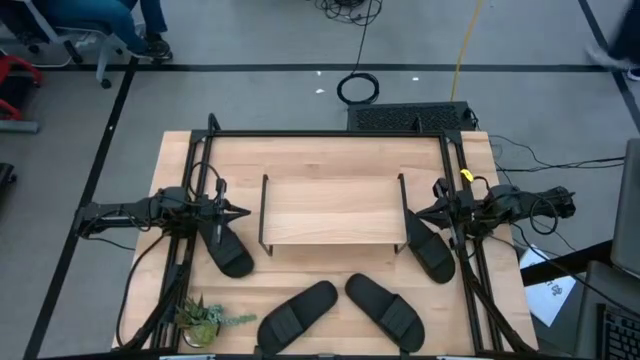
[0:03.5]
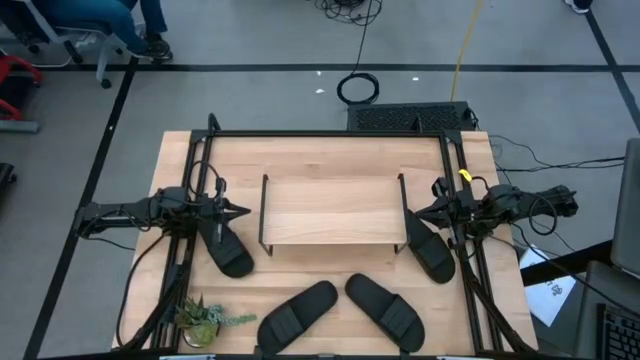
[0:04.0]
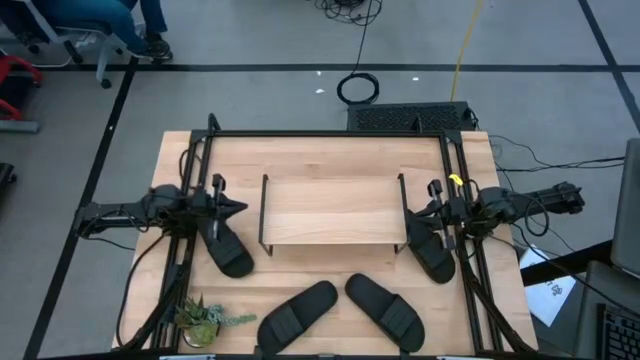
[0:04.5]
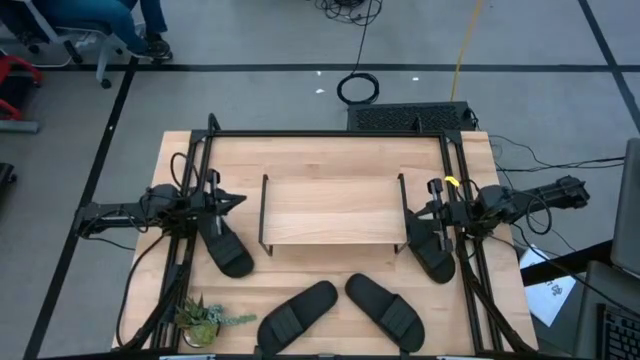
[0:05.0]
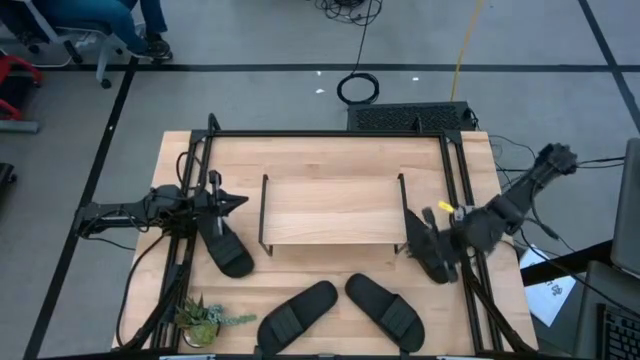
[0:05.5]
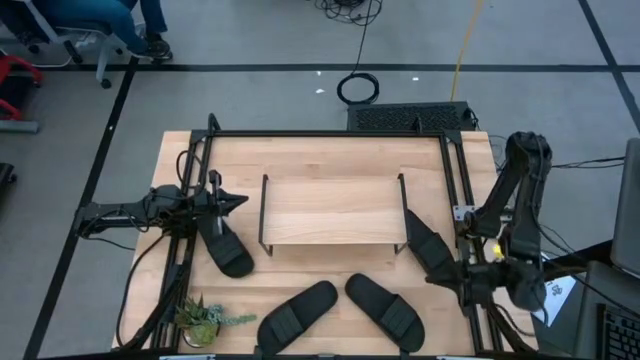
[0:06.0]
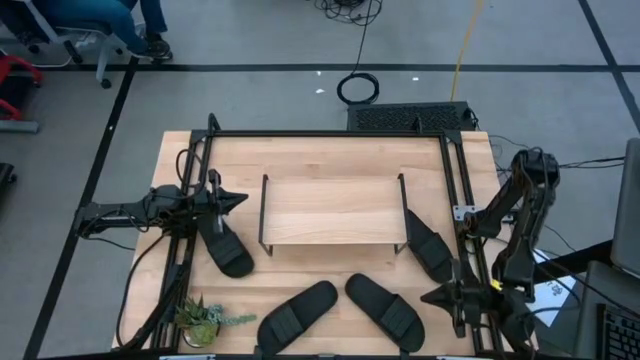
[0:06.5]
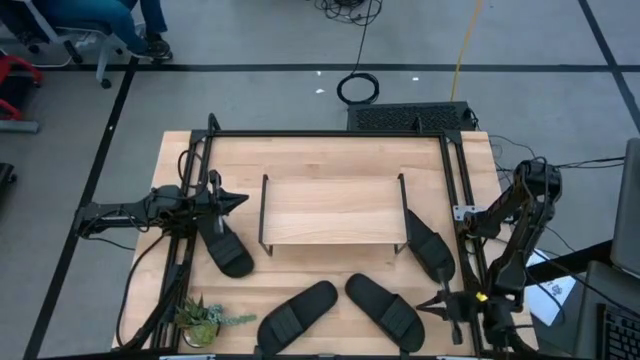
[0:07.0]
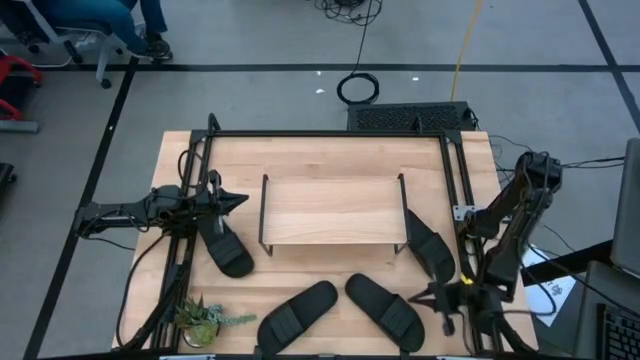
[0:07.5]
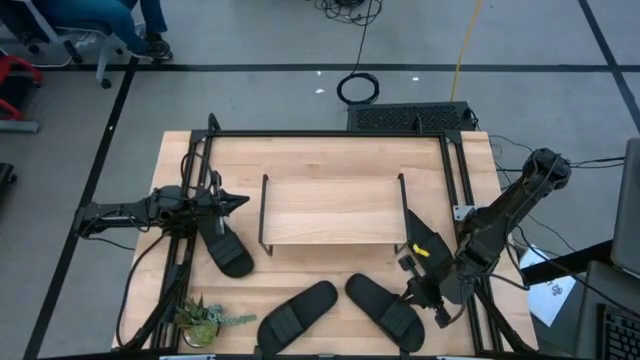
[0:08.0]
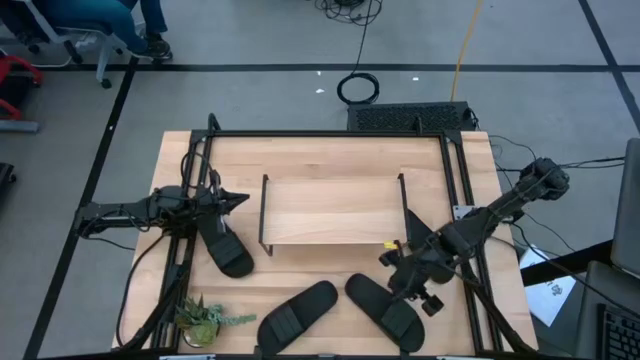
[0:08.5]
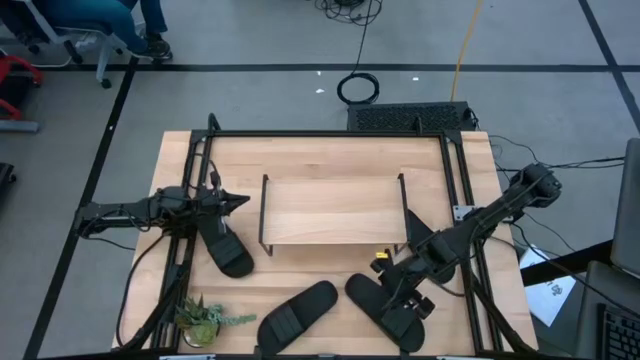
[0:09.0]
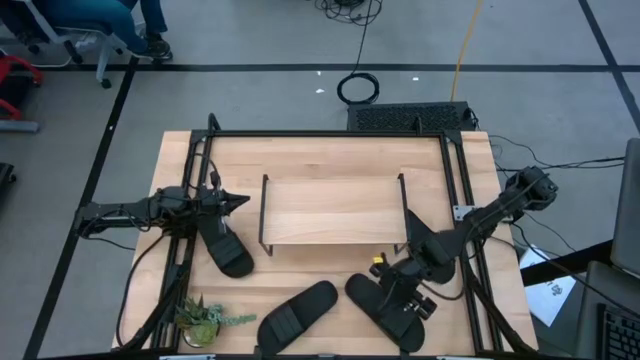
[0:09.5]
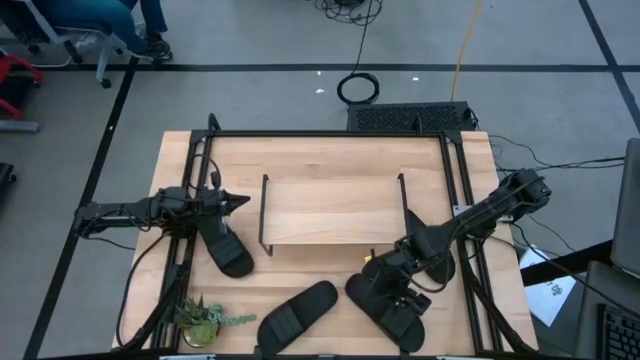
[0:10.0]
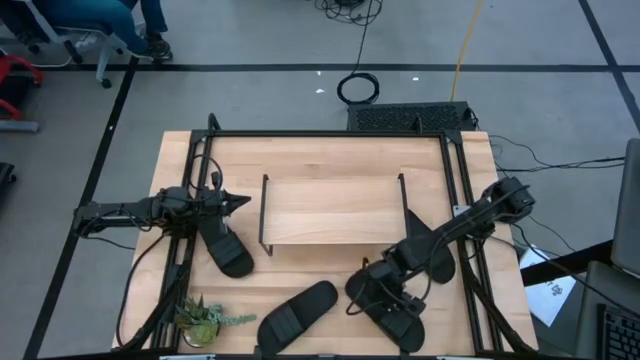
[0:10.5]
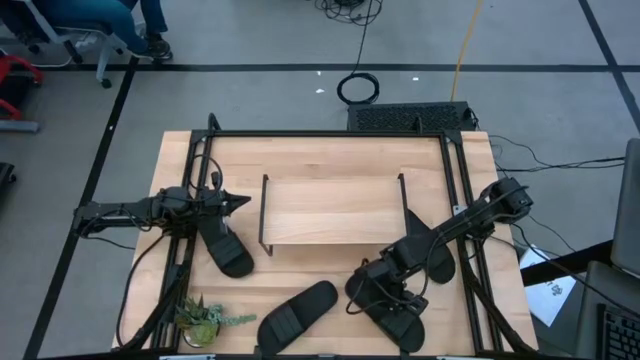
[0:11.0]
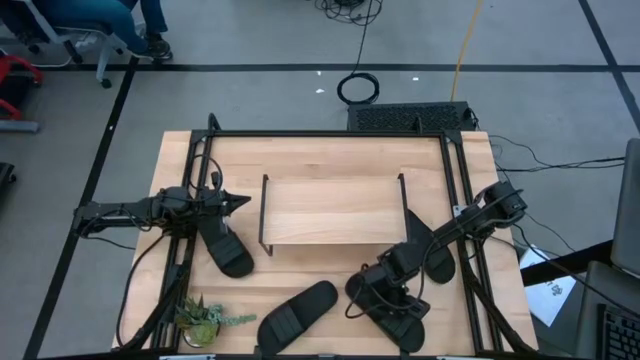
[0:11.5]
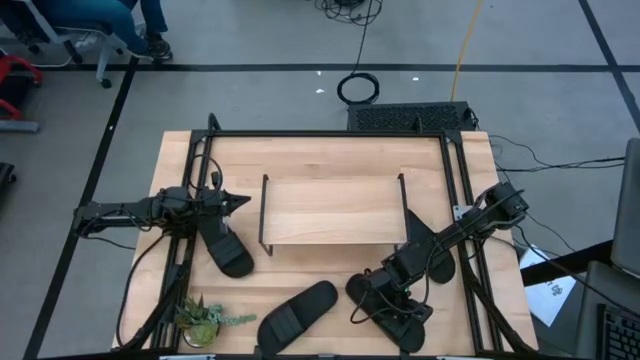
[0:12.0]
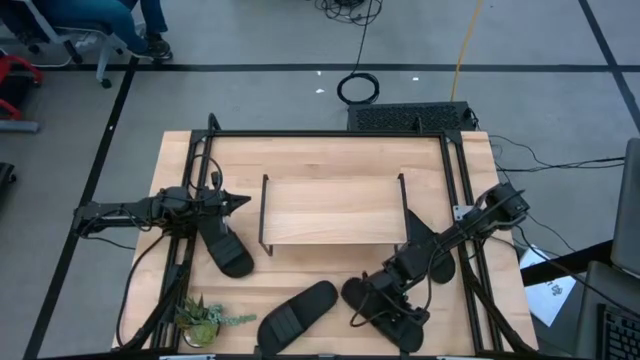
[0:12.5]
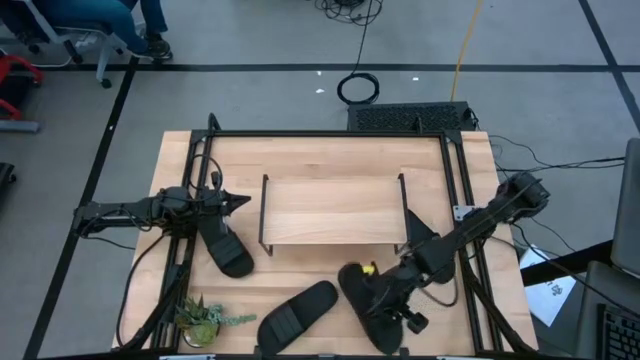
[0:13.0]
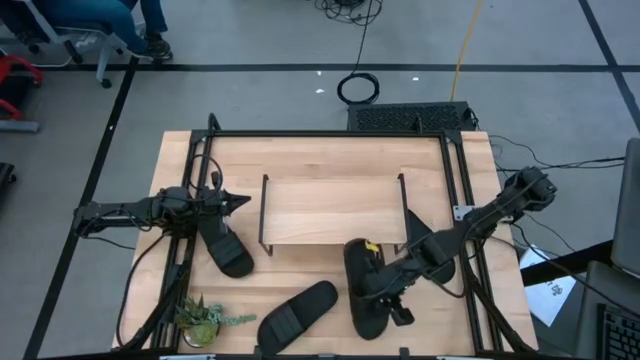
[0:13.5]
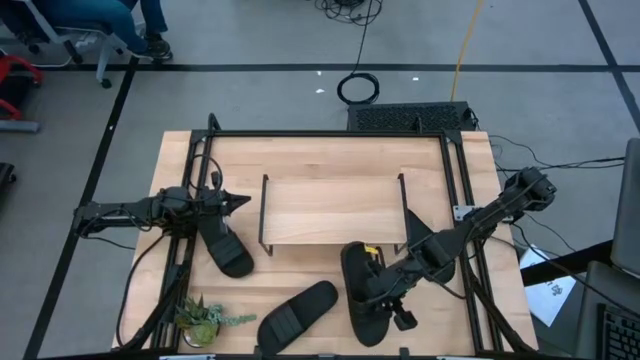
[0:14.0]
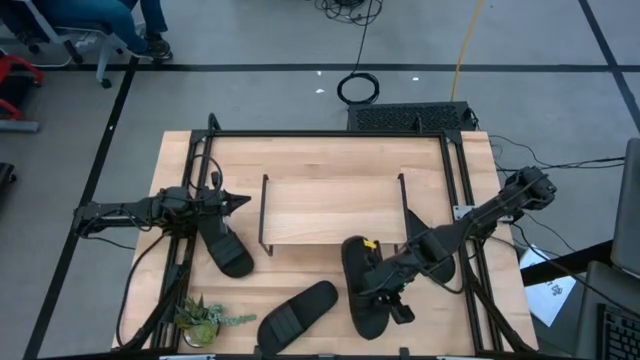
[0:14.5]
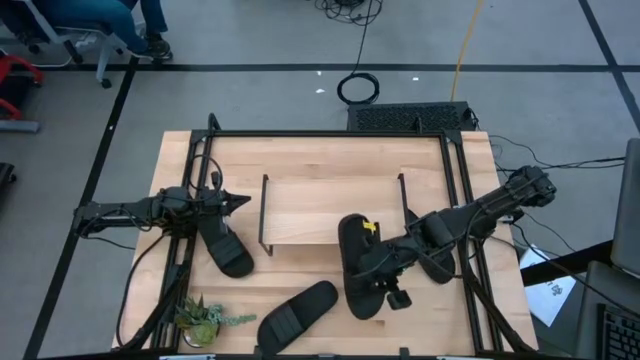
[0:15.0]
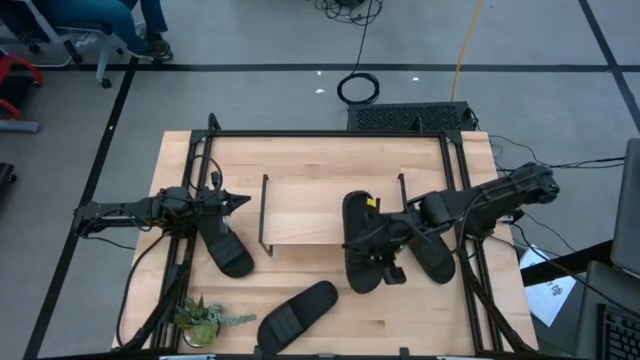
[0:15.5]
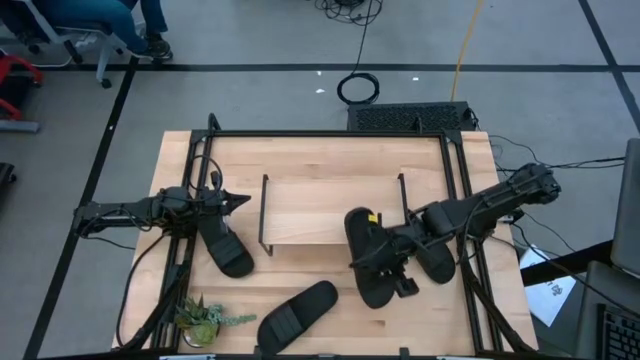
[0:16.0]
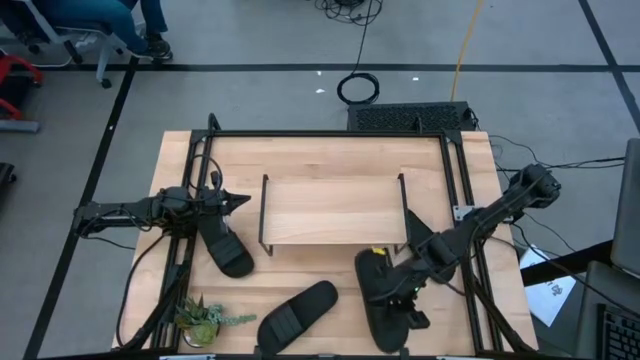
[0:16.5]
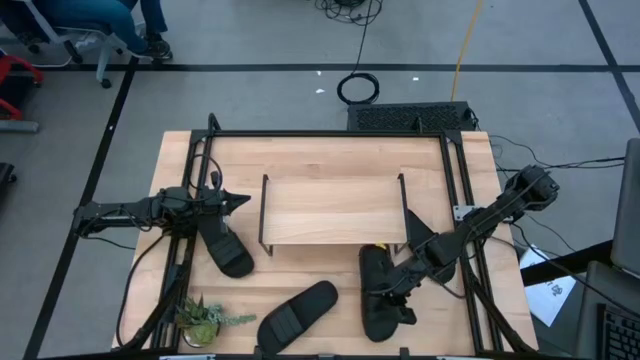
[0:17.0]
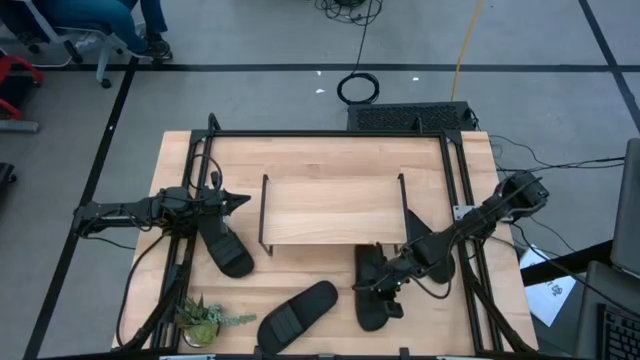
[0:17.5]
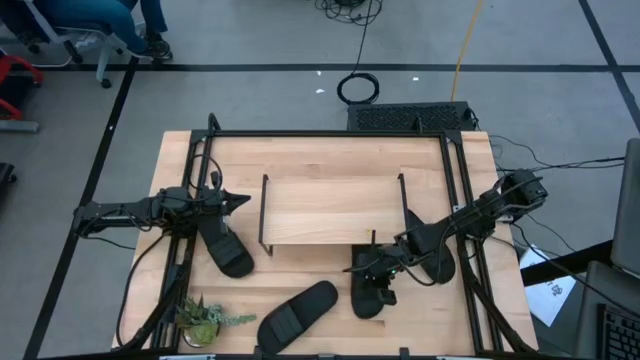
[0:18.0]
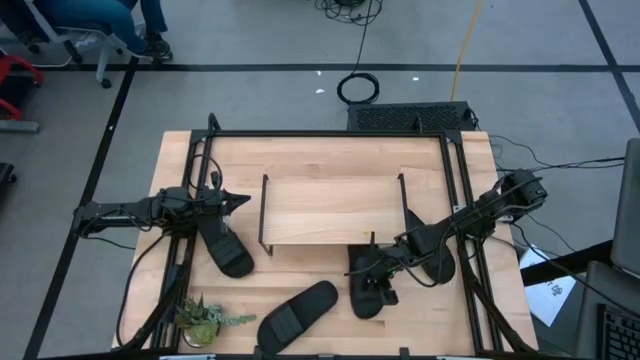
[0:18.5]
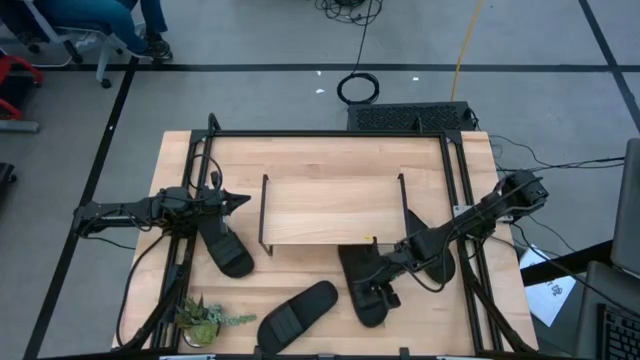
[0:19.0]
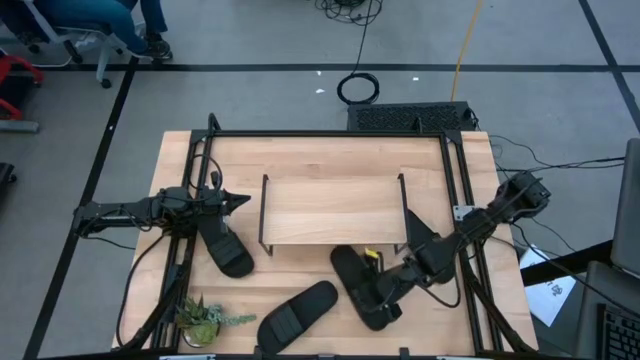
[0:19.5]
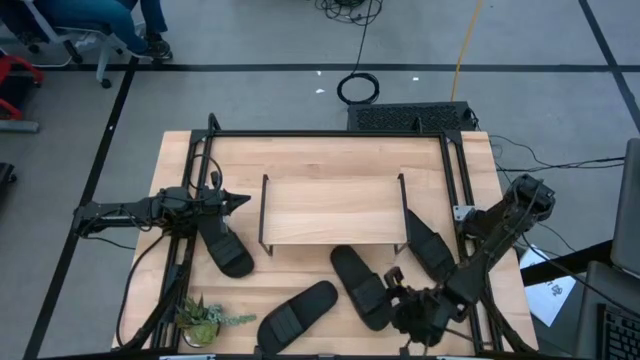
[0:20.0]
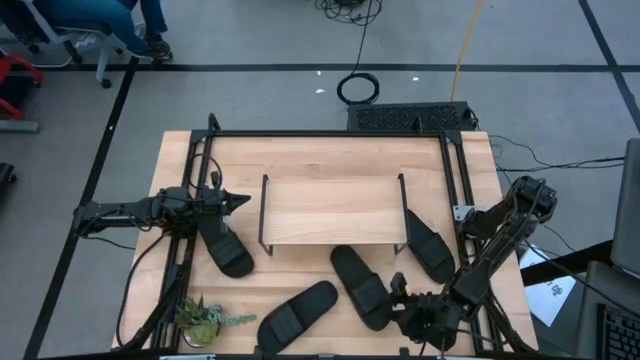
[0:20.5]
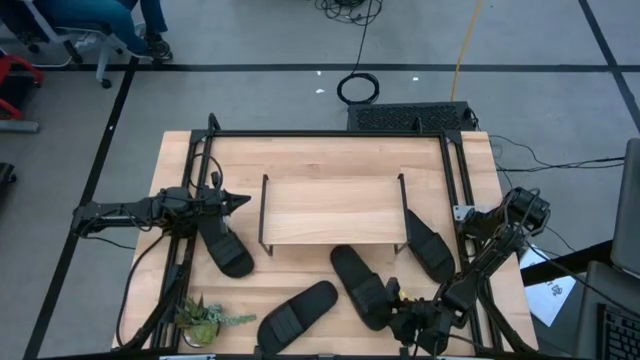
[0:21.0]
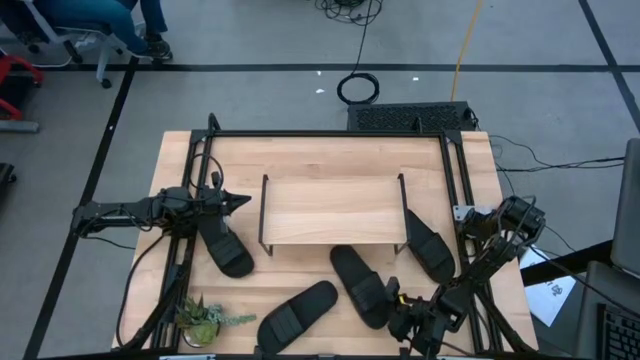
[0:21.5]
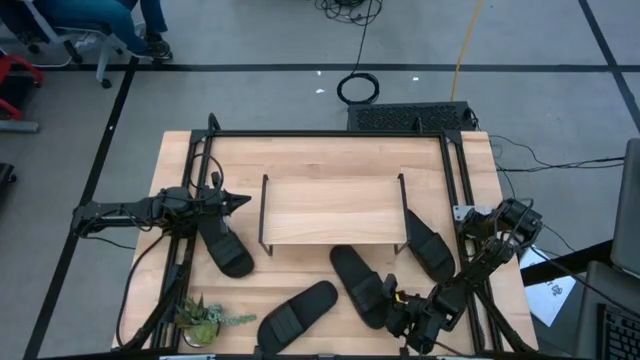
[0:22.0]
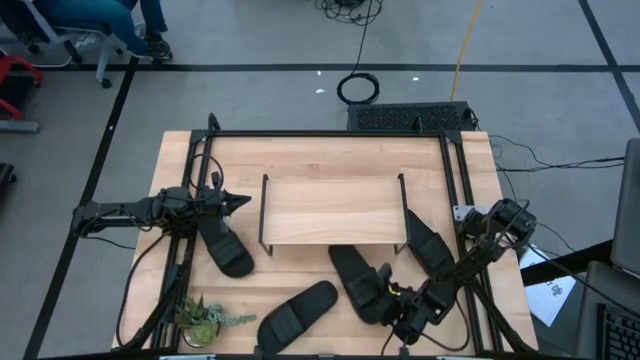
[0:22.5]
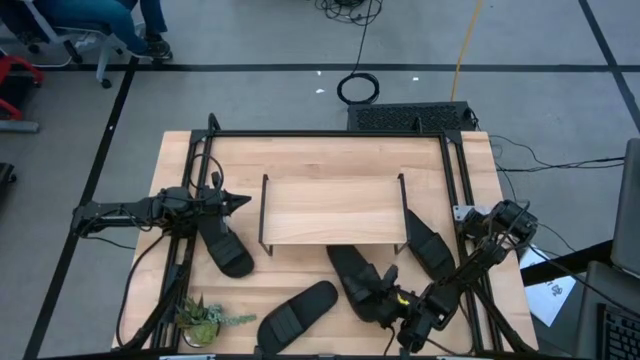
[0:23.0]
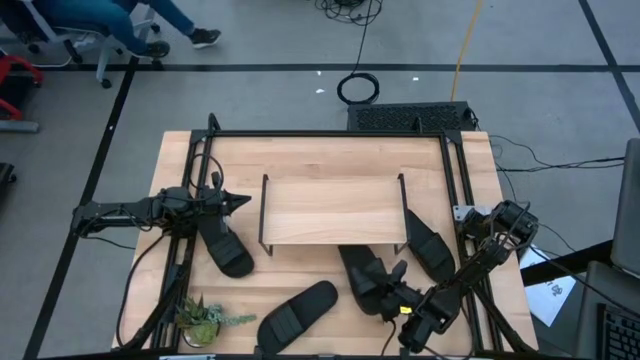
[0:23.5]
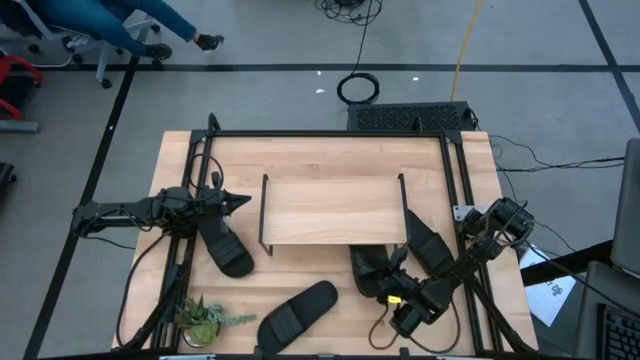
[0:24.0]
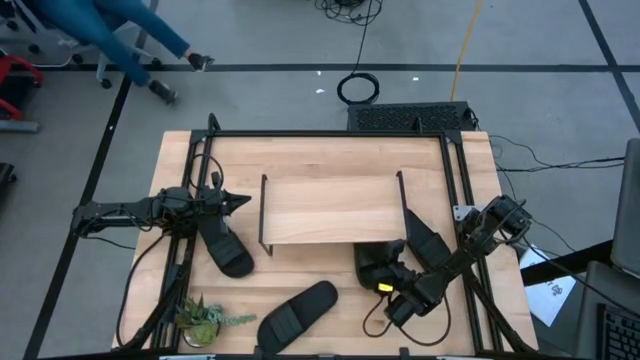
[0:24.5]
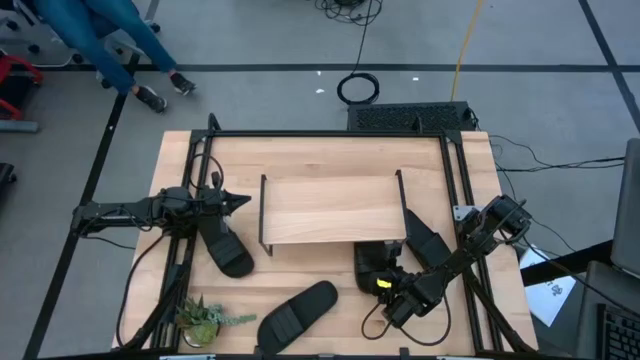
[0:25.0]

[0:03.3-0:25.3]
Task: Pick and place slides into the shelf
Put the bottom right black slipper under the shelf
